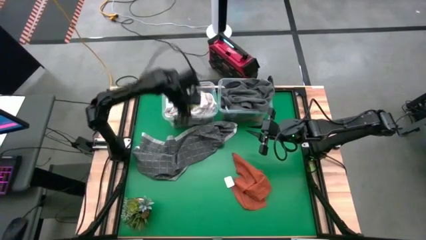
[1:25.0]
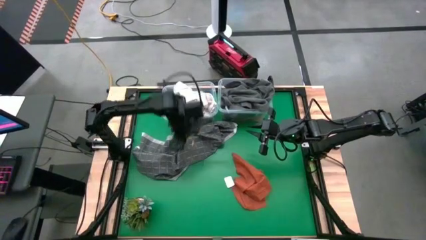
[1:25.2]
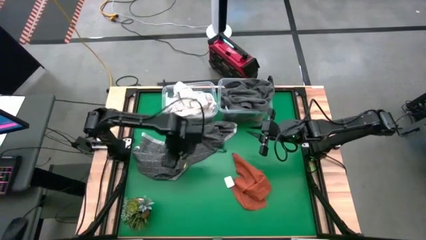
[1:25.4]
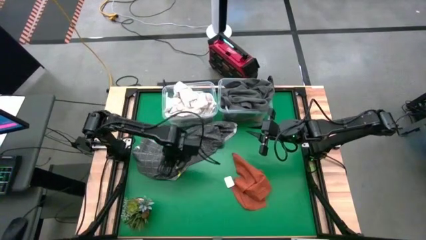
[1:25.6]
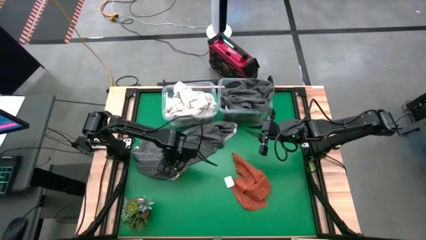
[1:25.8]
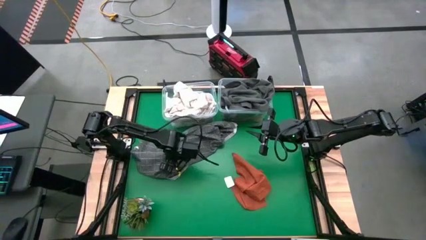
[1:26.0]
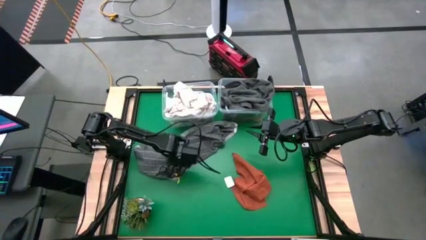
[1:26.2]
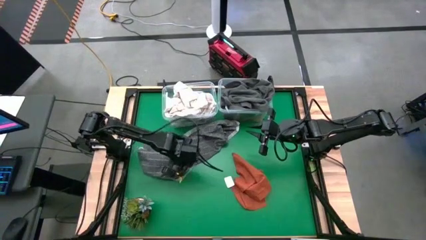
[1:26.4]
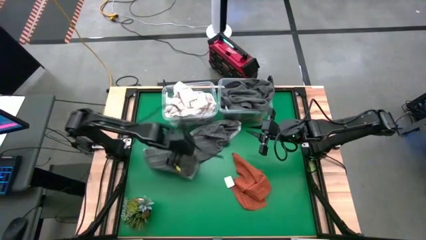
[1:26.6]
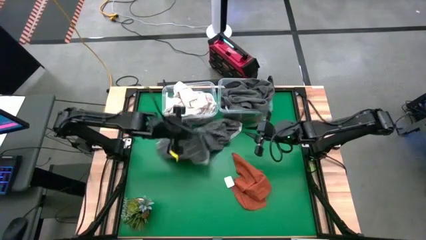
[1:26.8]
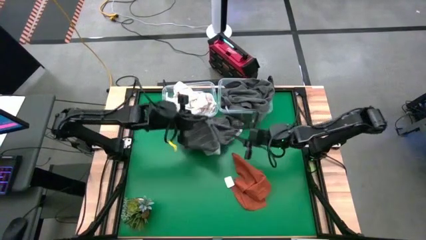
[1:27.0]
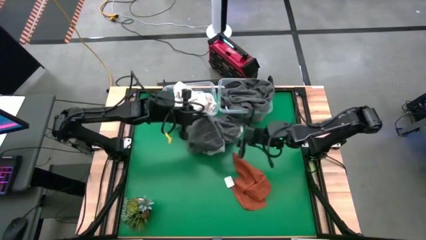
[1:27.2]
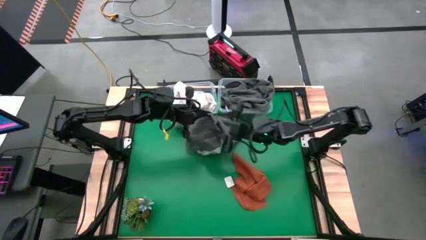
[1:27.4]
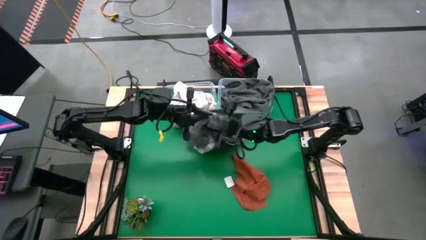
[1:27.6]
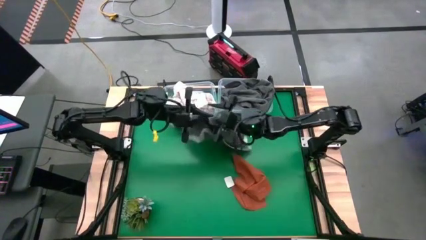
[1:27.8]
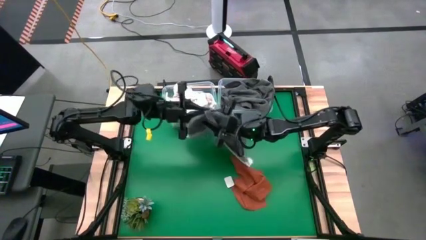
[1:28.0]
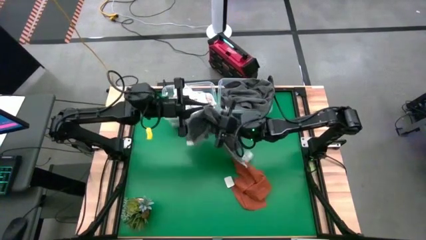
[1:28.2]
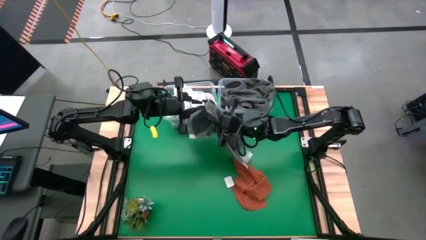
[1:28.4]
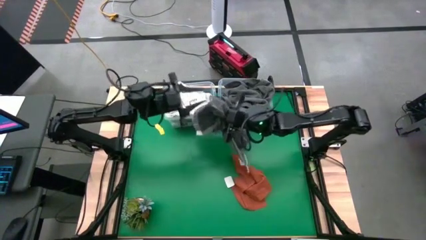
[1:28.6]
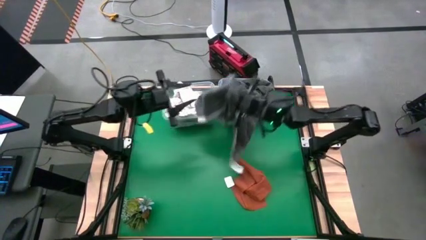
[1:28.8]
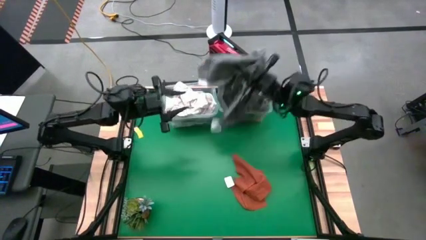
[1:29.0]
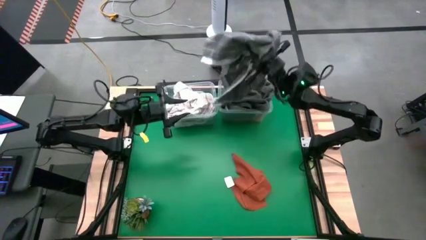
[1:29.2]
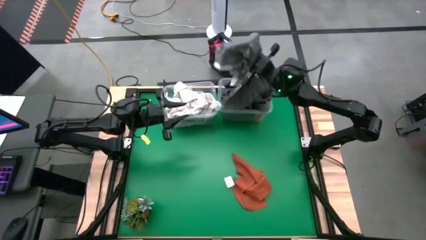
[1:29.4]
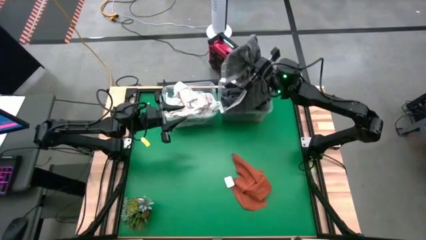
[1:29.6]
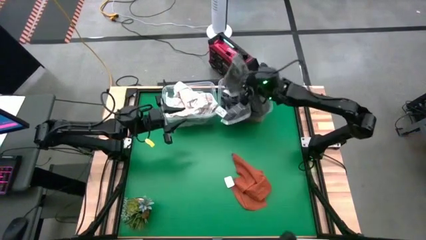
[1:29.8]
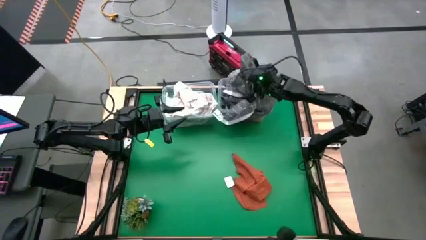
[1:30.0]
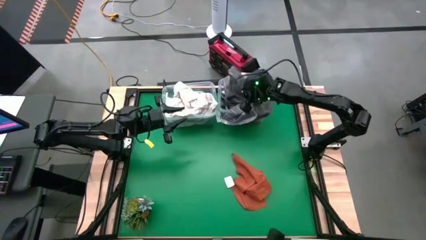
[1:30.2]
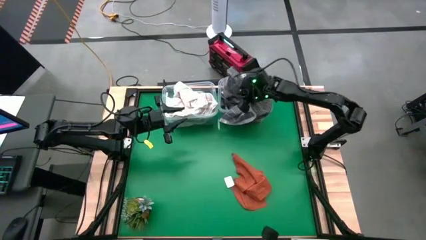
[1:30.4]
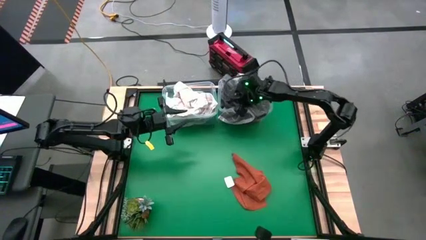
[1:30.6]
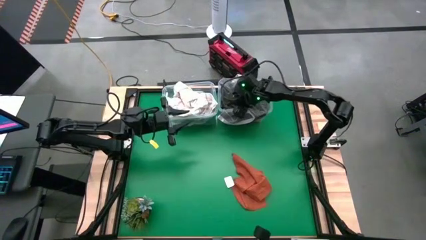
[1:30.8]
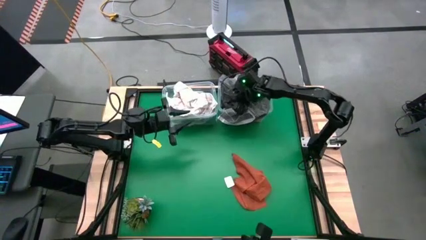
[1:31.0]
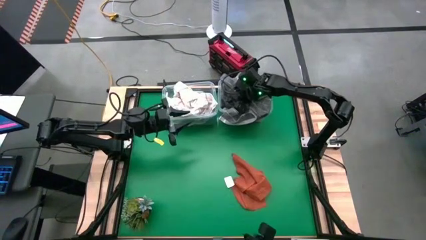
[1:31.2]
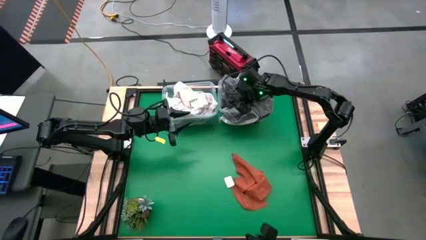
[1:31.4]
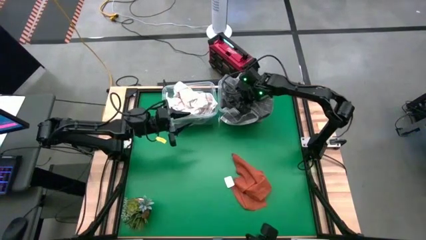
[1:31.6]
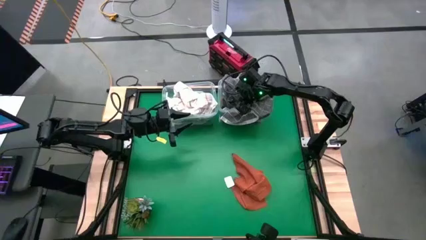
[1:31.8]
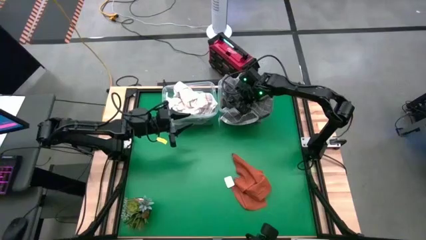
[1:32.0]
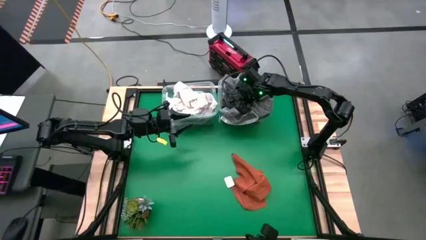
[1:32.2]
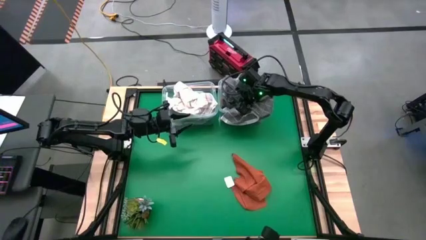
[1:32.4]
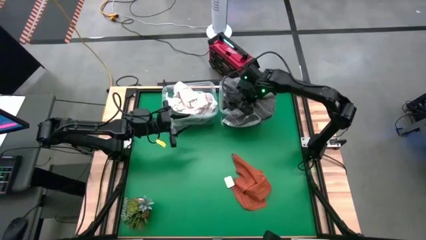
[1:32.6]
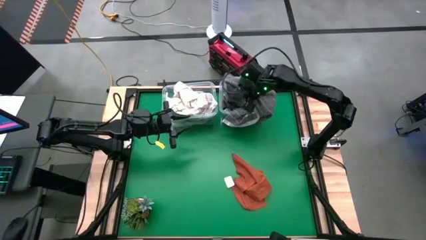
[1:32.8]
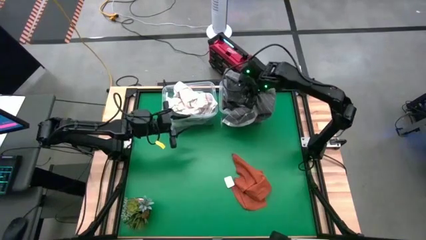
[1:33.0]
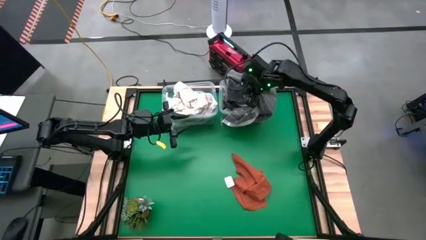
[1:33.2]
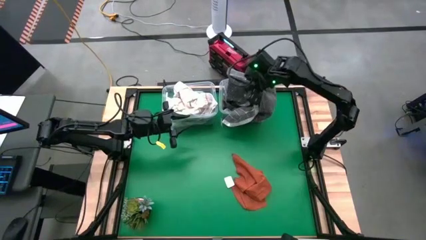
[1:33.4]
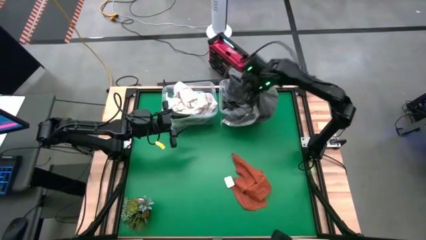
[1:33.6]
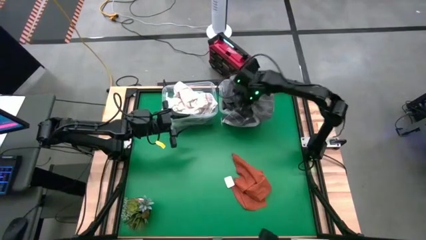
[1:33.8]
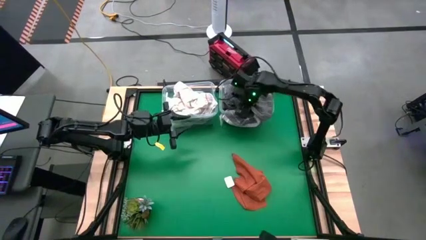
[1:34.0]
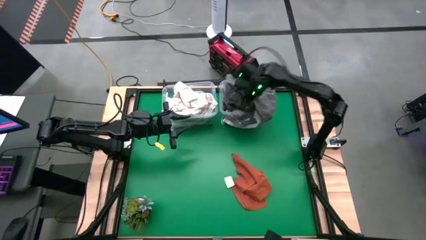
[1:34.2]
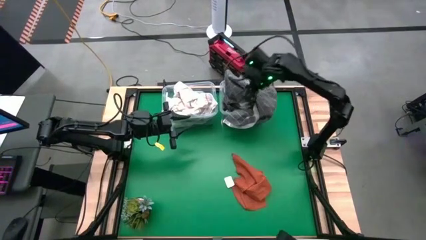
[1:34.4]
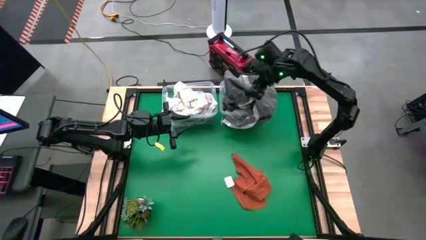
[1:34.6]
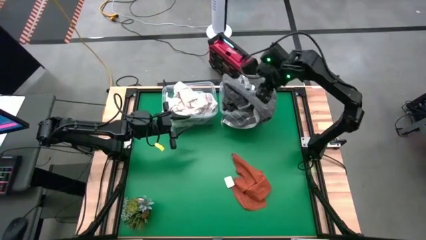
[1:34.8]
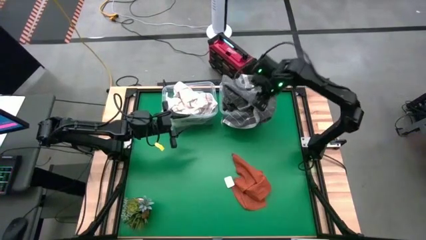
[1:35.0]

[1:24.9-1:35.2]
Task: Sort towels by color in basket
Put the black towel into the right transparent bin
